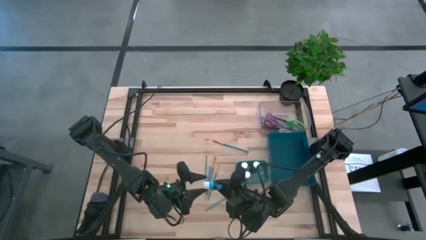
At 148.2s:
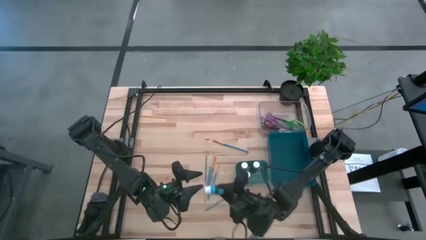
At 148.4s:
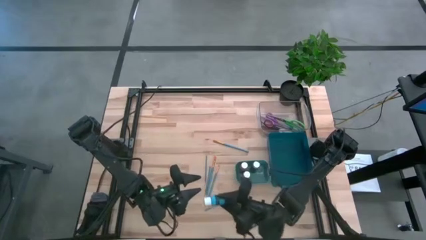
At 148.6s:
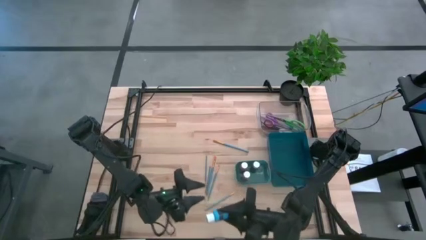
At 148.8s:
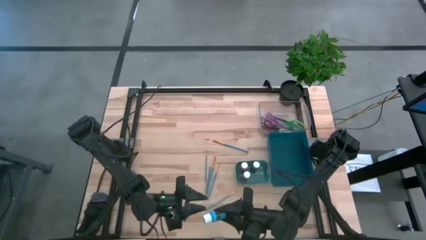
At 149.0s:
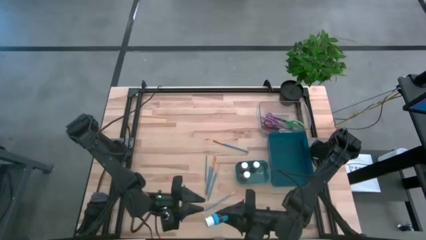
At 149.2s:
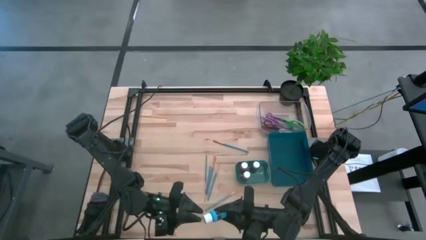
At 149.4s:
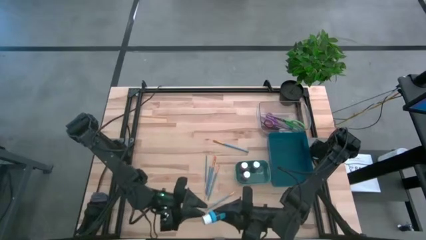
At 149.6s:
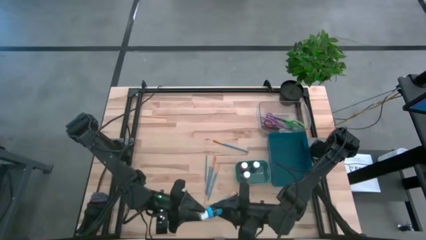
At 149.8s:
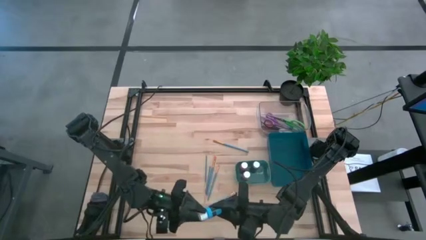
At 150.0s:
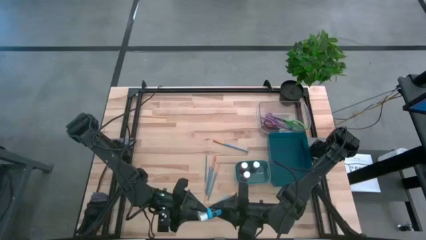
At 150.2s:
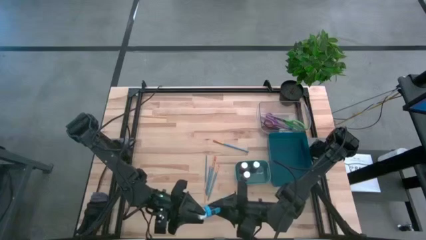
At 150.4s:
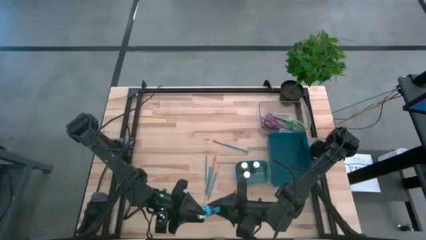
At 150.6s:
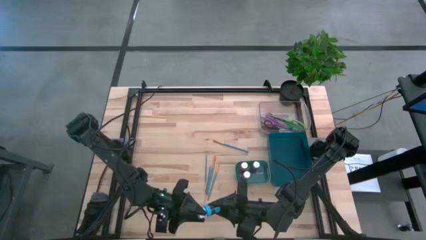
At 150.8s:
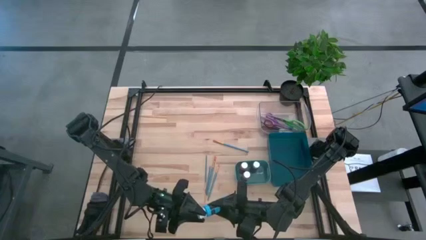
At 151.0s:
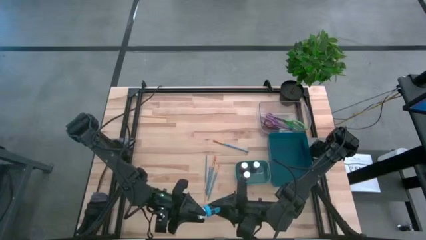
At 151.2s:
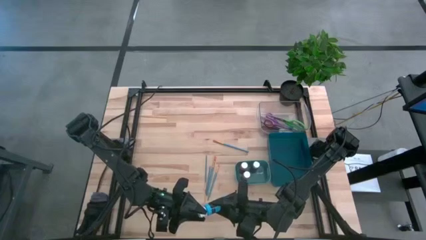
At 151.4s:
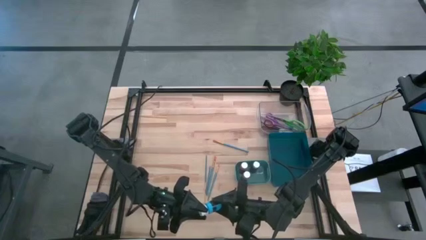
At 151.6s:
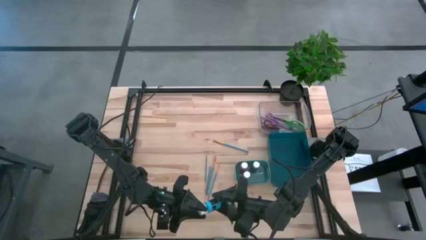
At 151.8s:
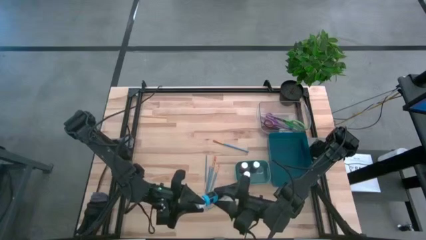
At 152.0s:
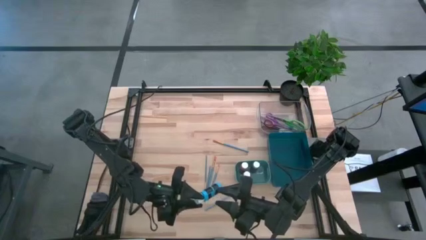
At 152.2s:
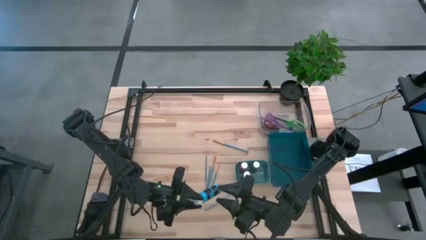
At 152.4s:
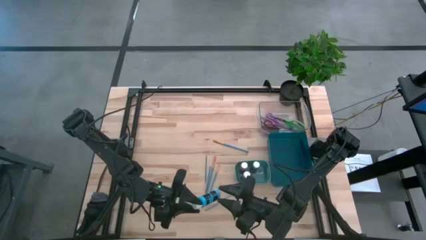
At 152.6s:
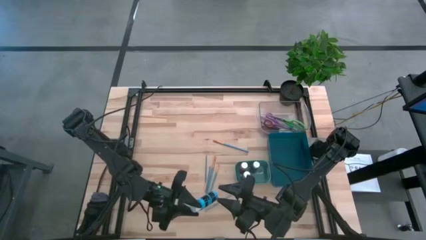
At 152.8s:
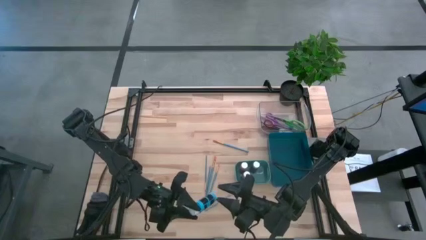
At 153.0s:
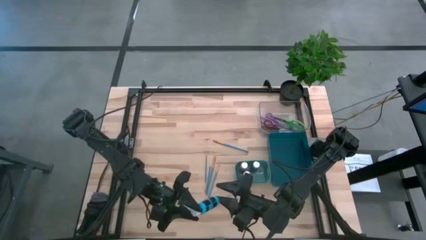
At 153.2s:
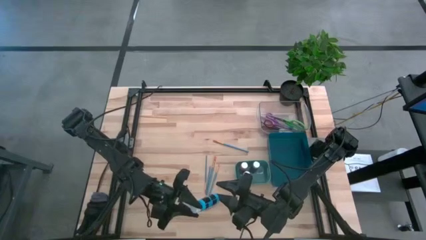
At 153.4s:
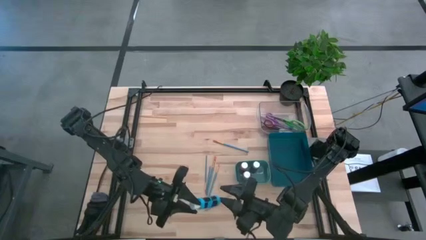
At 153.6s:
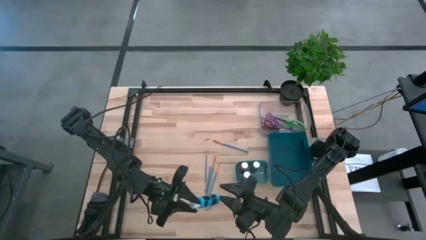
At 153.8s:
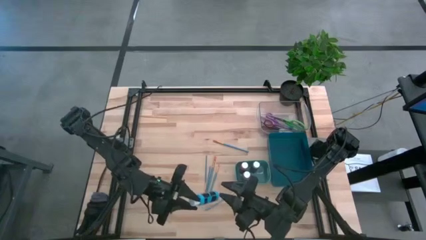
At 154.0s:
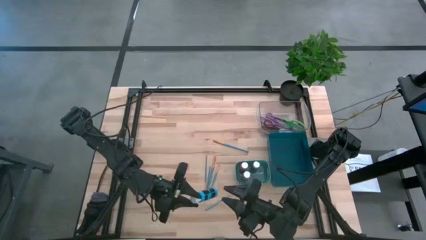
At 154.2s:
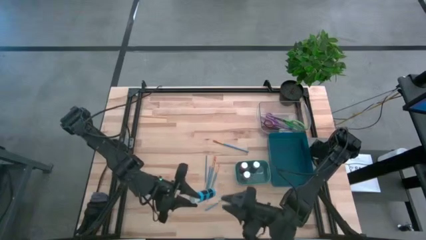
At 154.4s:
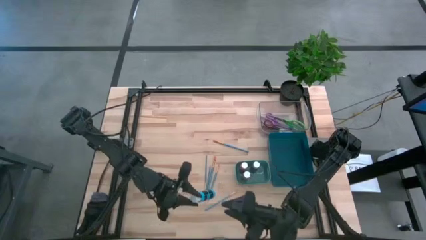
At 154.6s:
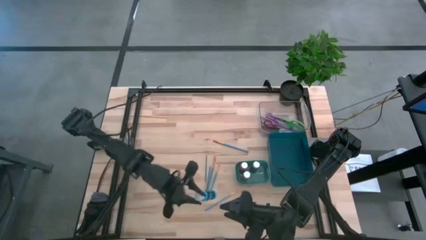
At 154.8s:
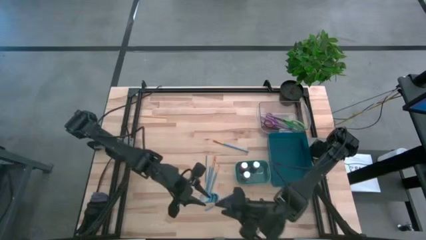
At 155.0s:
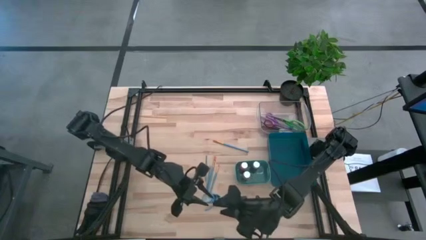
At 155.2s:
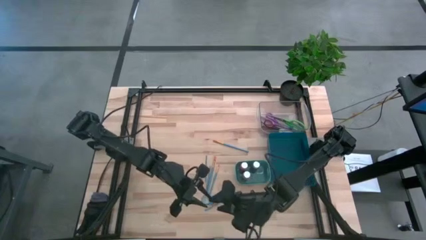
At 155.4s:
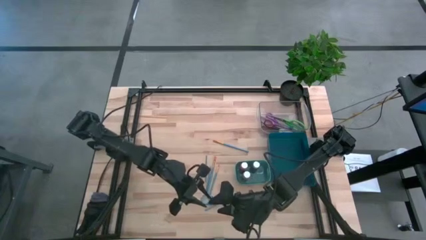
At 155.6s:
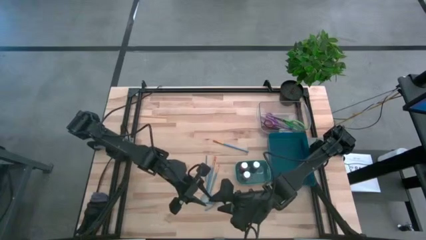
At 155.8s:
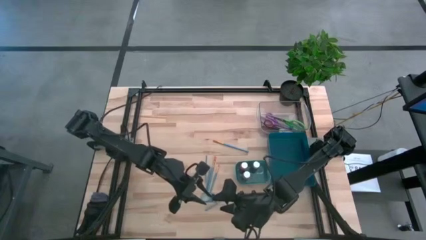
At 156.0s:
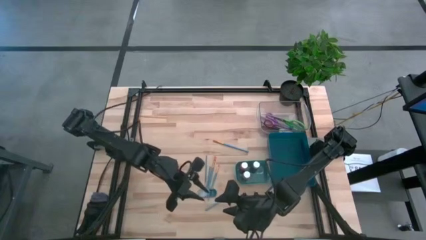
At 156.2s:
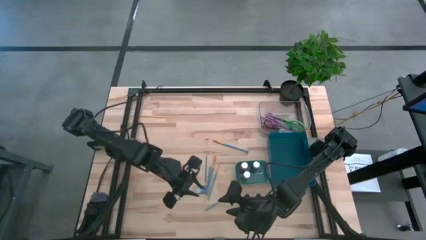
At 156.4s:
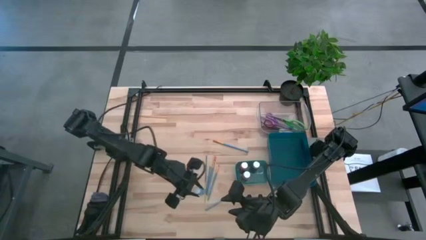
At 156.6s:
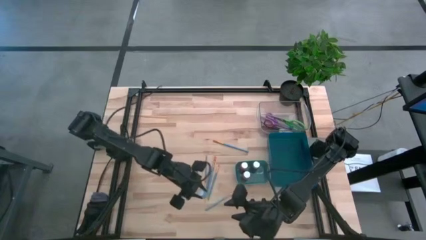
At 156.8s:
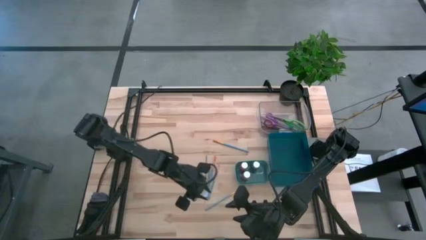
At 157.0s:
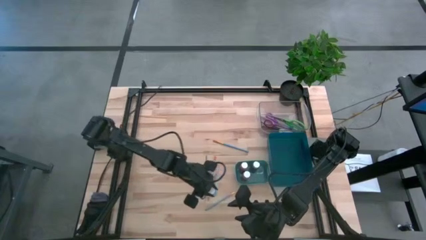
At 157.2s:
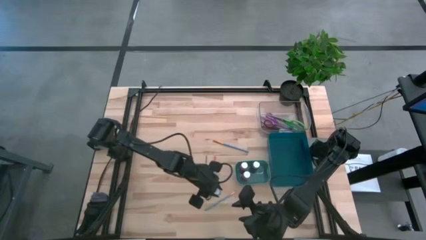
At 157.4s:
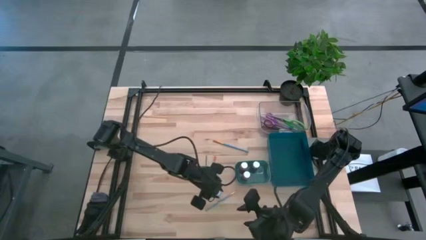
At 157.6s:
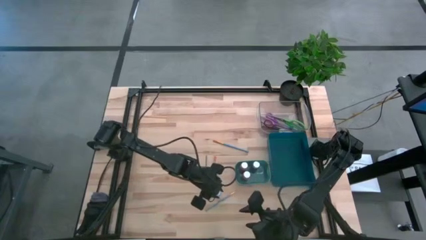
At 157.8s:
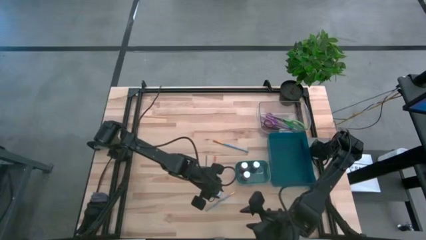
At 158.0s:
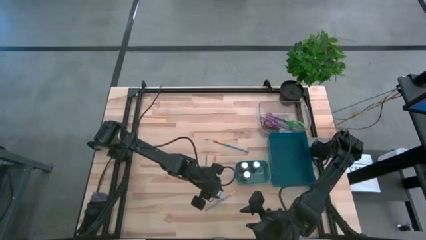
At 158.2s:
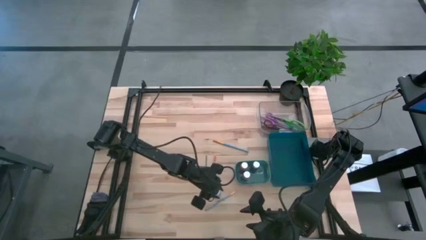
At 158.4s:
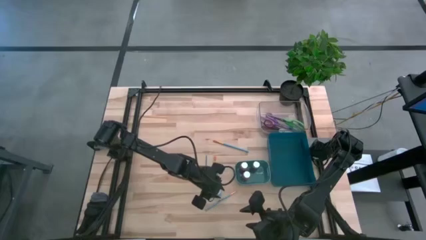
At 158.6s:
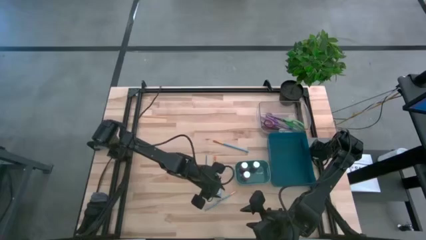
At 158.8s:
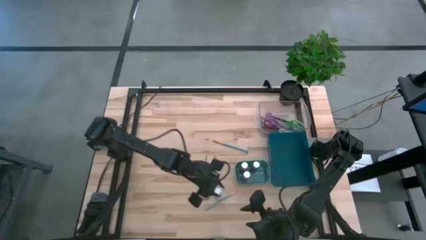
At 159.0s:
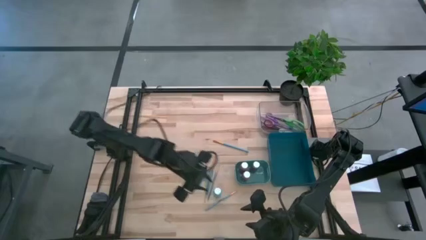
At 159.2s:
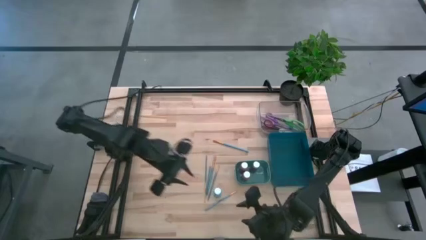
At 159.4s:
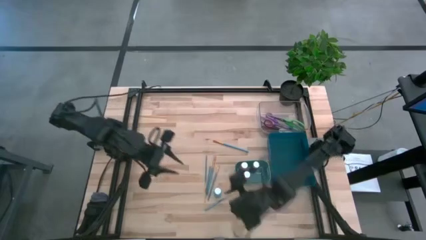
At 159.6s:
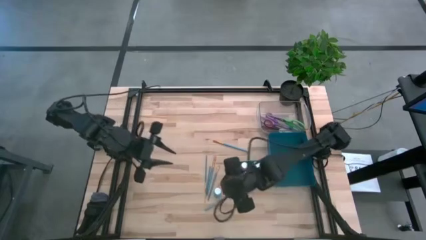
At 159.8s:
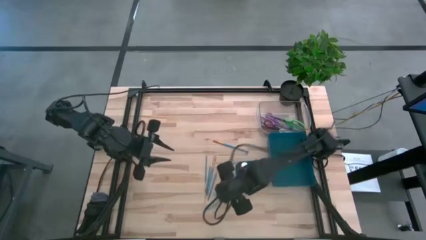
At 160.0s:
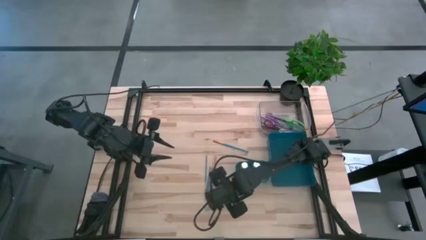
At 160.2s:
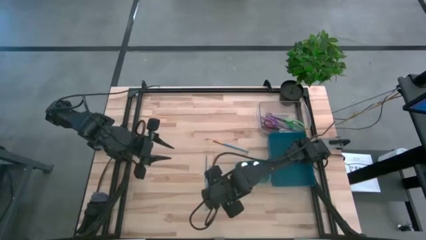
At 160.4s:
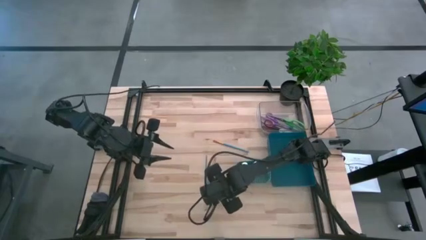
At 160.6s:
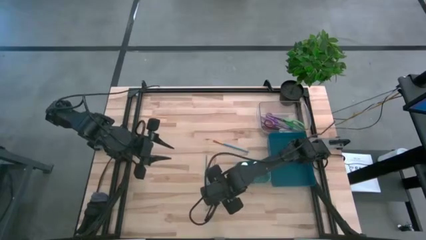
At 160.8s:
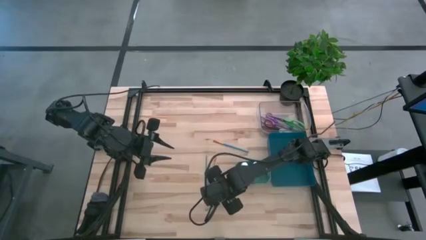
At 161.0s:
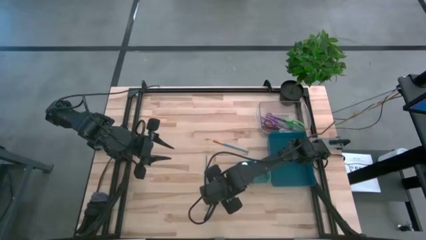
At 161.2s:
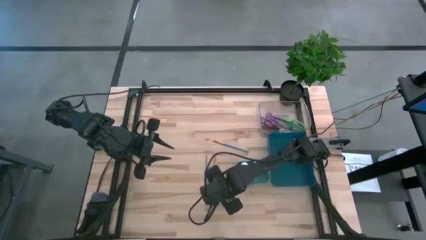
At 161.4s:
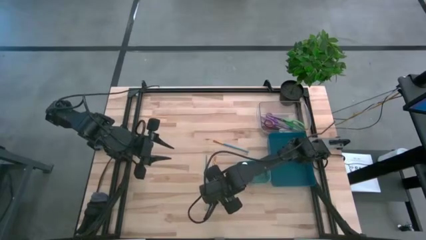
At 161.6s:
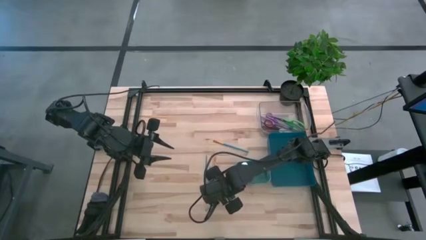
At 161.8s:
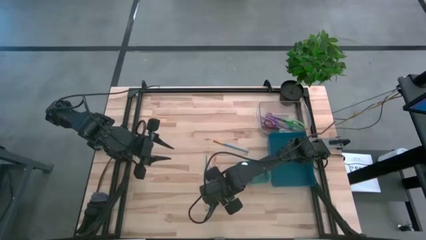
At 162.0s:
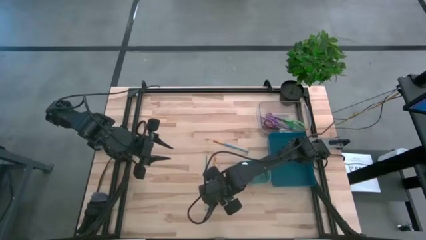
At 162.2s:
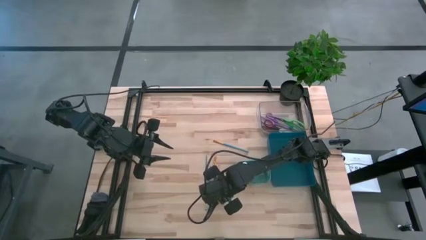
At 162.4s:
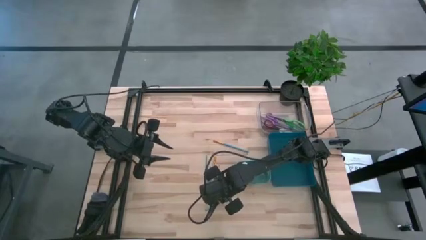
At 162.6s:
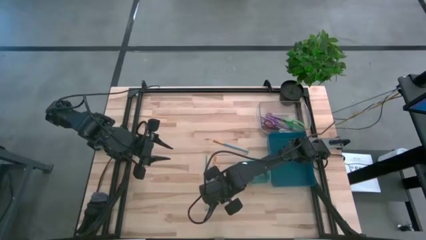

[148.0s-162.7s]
Task: Pick & Place Paint Supplies
Put the blue paint bottle into the green bin

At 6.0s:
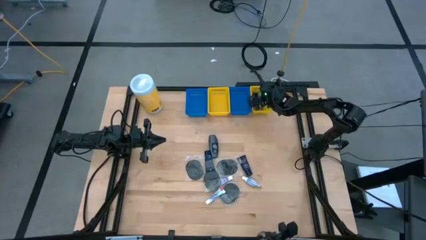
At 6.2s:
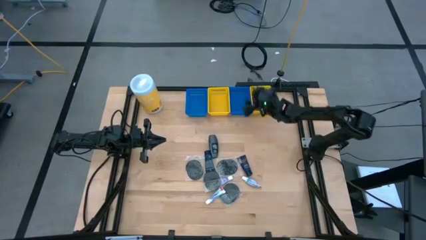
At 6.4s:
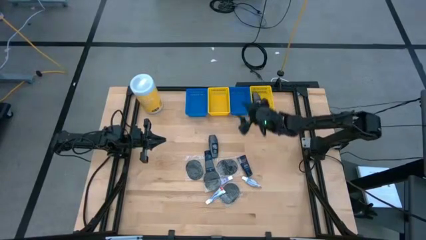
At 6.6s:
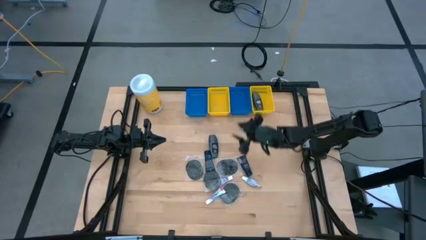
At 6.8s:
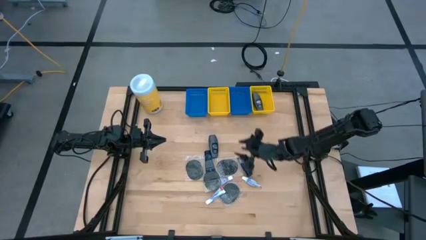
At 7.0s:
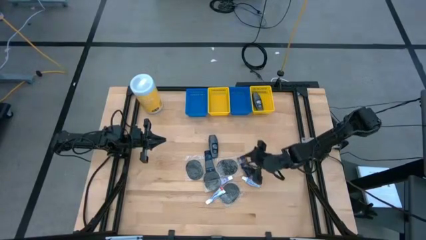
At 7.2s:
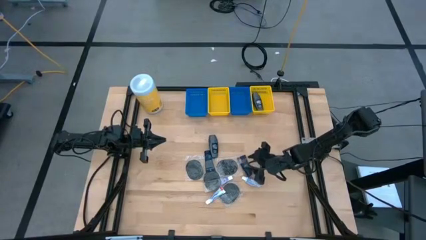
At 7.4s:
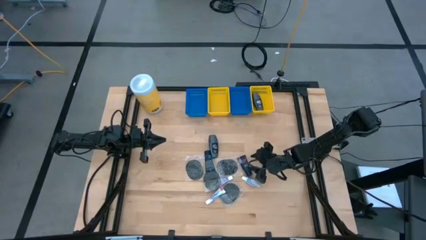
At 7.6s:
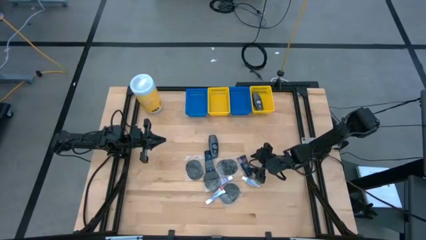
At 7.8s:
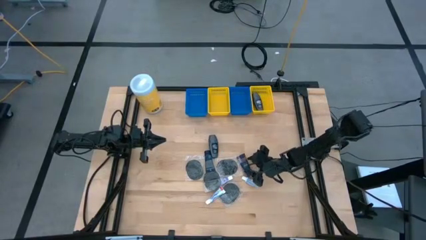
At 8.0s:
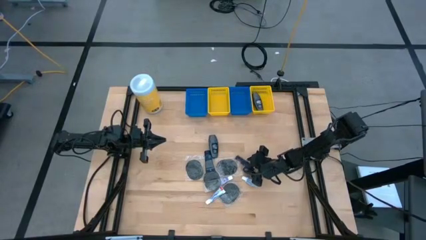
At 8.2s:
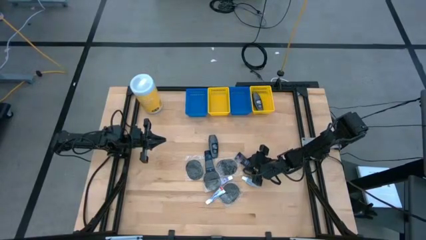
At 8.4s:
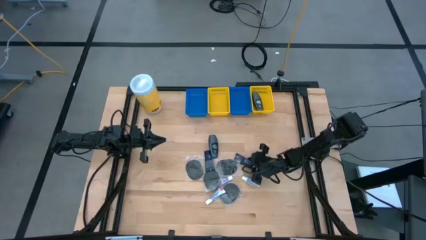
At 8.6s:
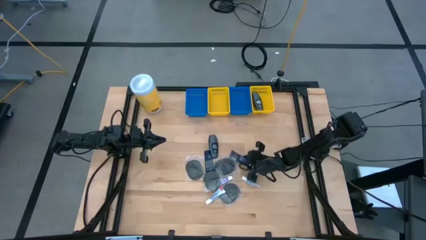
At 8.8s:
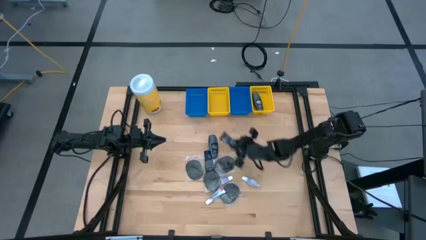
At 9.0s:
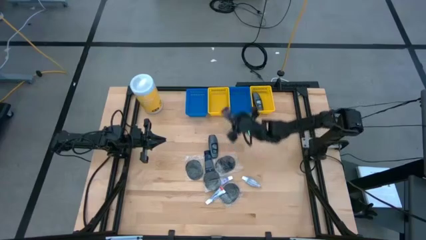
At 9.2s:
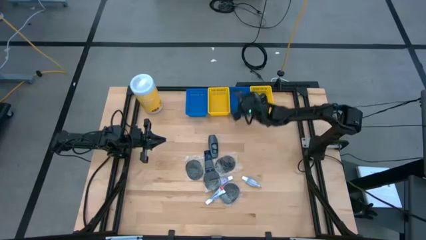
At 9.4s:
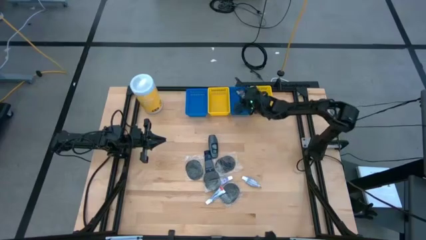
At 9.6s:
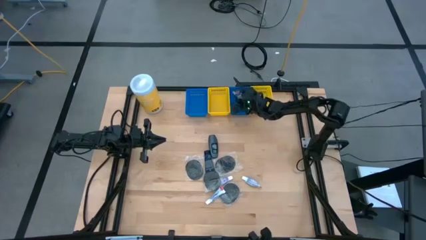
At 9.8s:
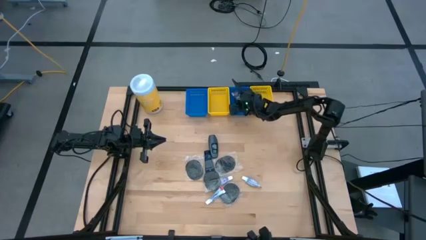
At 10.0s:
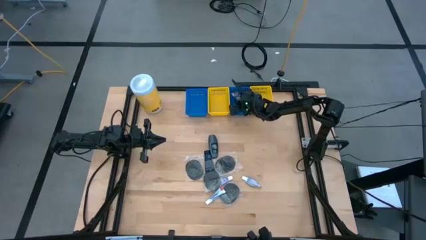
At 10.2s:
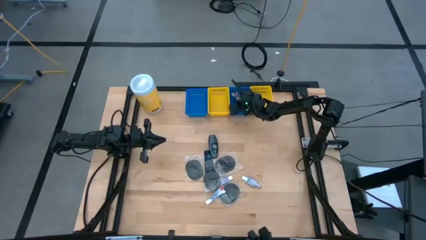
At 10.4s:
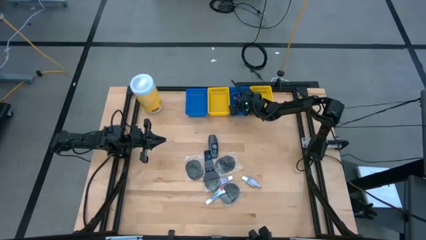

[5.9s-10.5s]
Task: Pick & Place Travel size toiletries
Put the blue shave cream into the right blue bin
